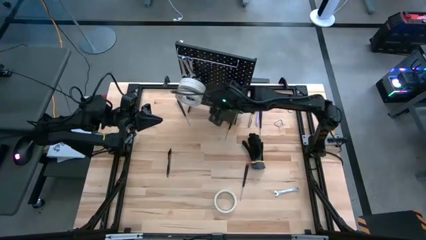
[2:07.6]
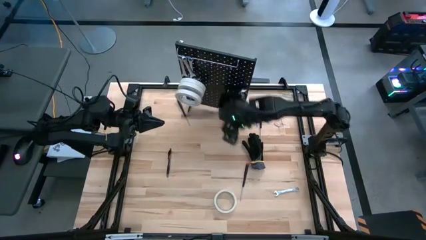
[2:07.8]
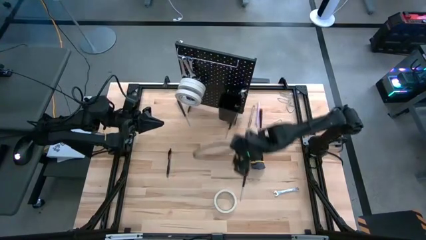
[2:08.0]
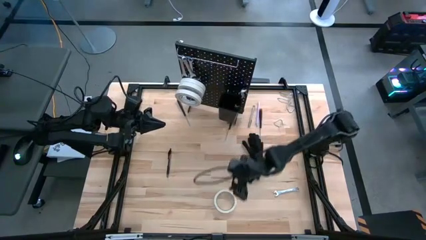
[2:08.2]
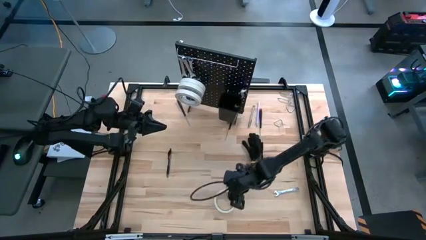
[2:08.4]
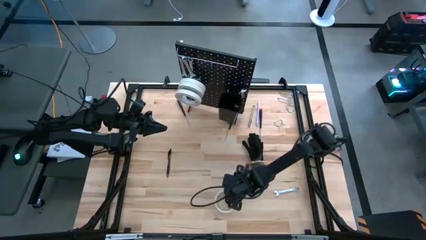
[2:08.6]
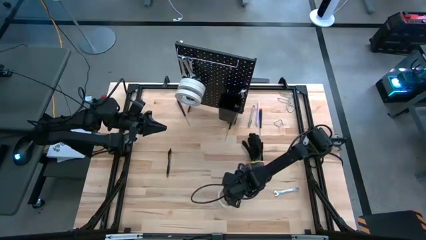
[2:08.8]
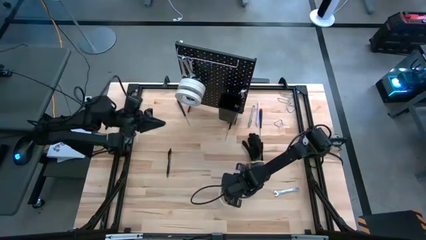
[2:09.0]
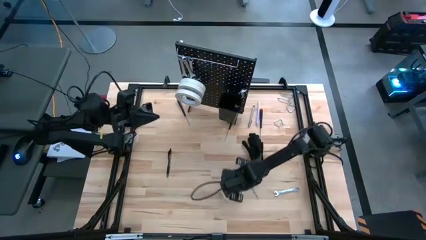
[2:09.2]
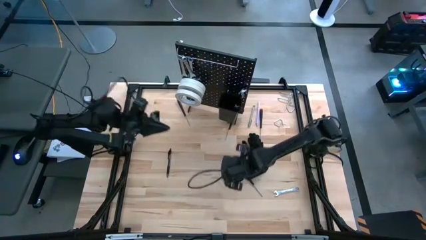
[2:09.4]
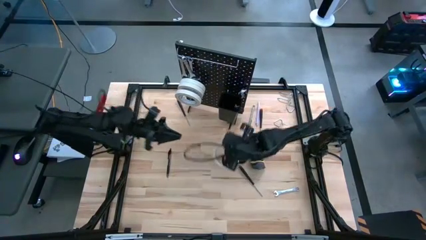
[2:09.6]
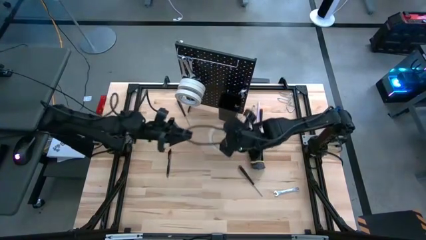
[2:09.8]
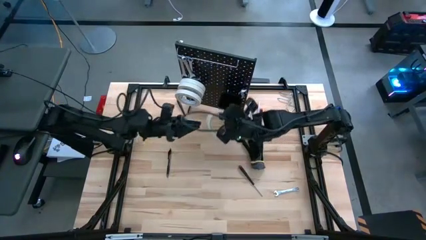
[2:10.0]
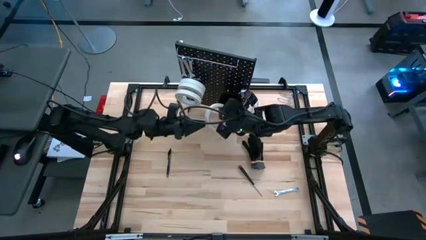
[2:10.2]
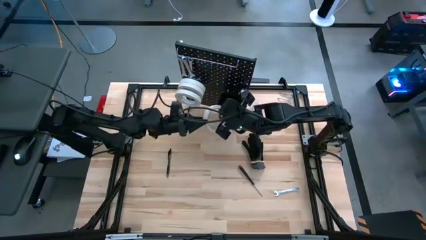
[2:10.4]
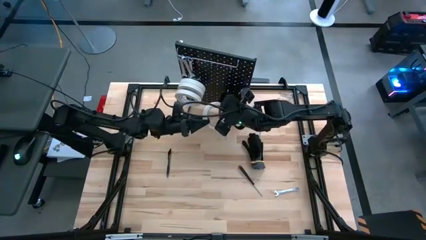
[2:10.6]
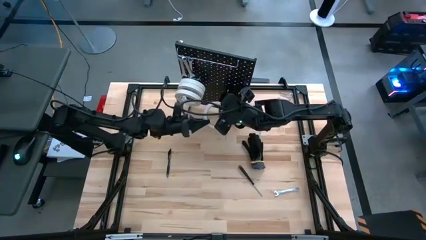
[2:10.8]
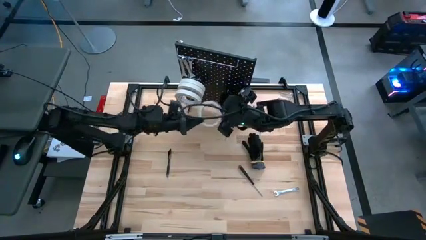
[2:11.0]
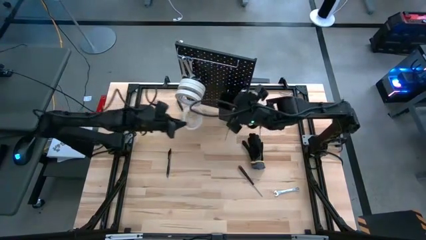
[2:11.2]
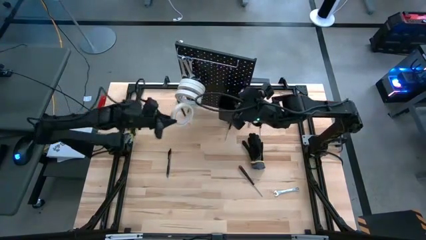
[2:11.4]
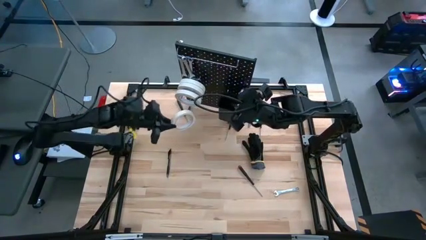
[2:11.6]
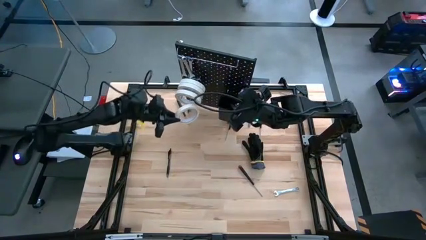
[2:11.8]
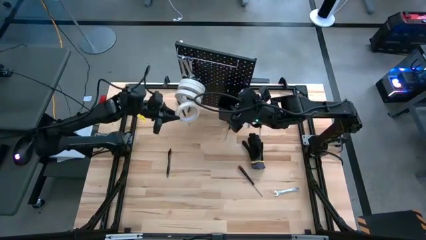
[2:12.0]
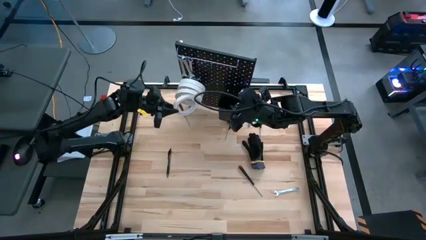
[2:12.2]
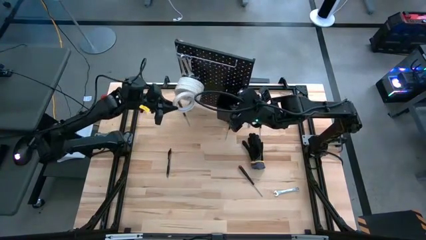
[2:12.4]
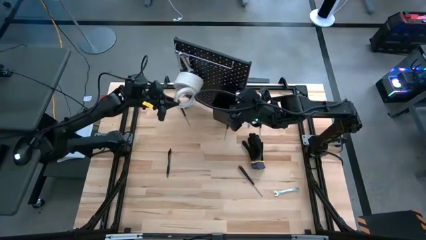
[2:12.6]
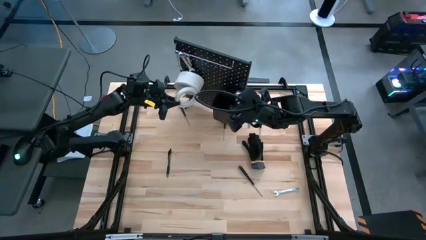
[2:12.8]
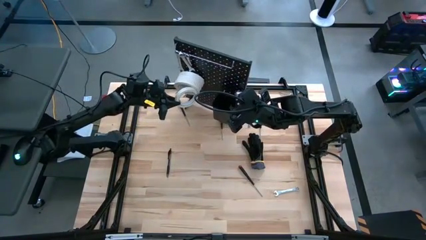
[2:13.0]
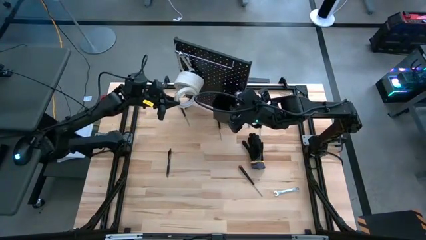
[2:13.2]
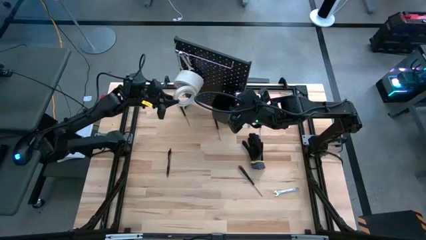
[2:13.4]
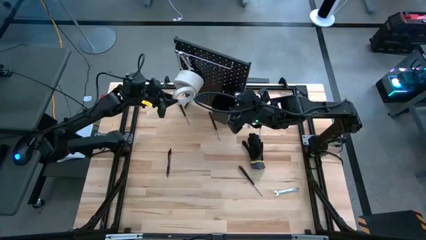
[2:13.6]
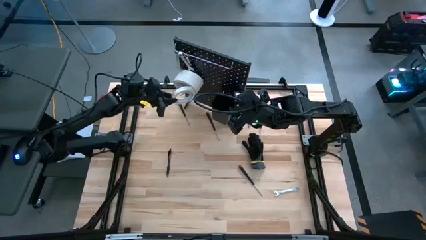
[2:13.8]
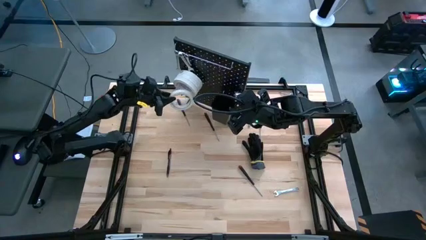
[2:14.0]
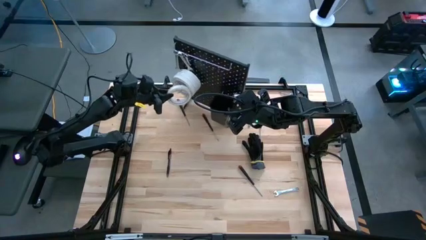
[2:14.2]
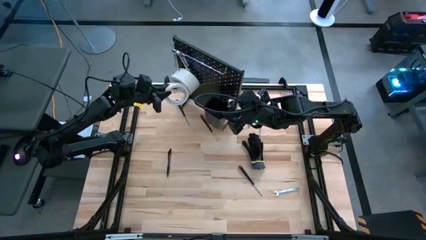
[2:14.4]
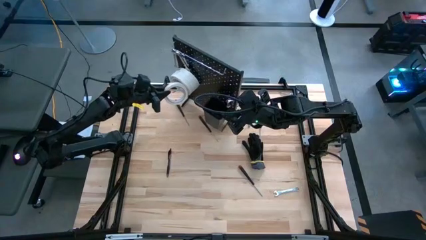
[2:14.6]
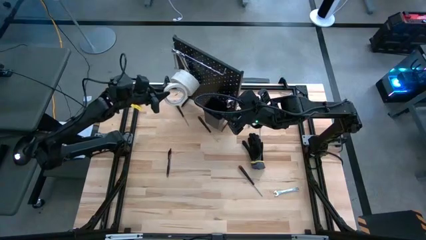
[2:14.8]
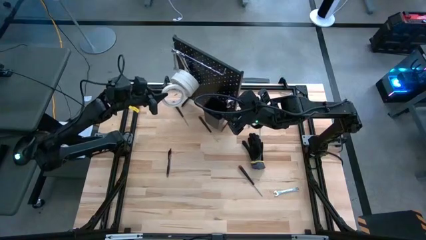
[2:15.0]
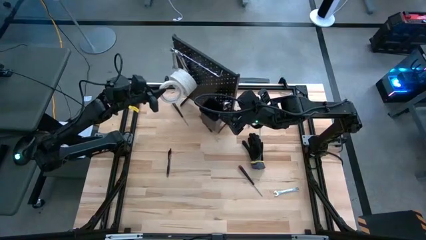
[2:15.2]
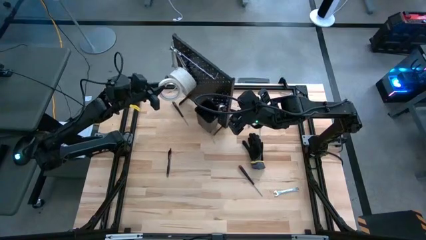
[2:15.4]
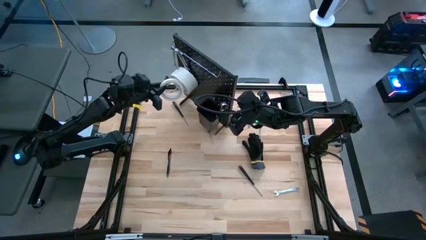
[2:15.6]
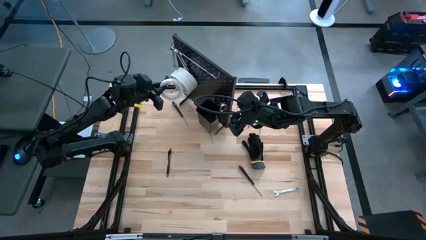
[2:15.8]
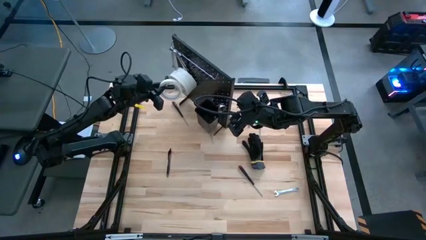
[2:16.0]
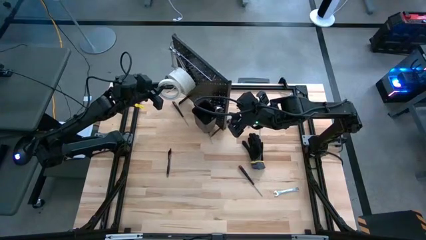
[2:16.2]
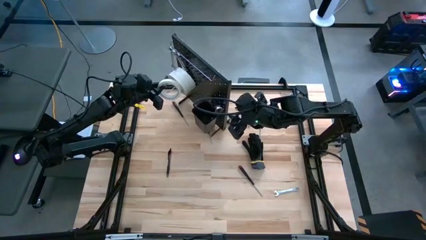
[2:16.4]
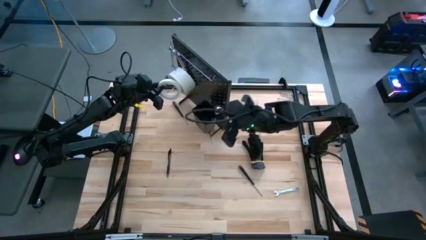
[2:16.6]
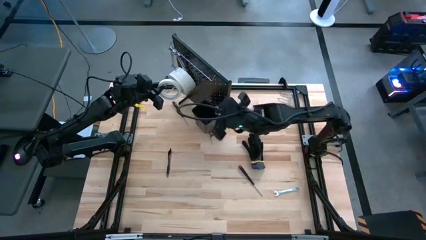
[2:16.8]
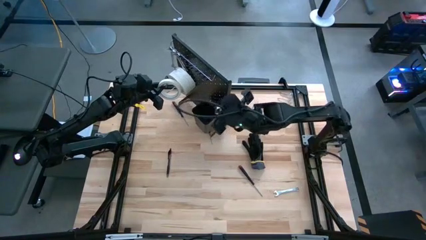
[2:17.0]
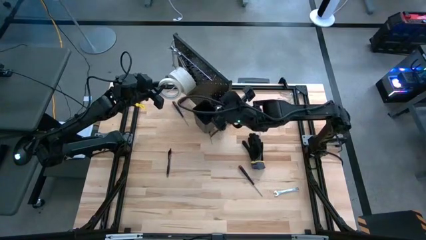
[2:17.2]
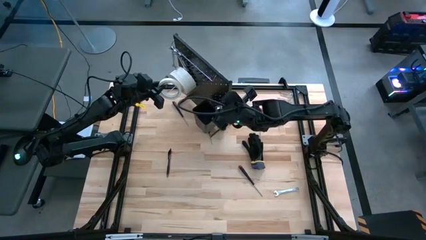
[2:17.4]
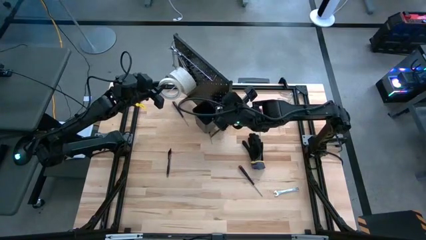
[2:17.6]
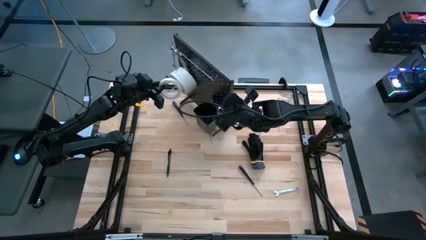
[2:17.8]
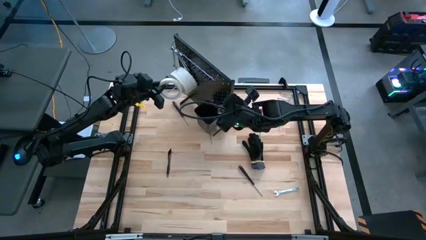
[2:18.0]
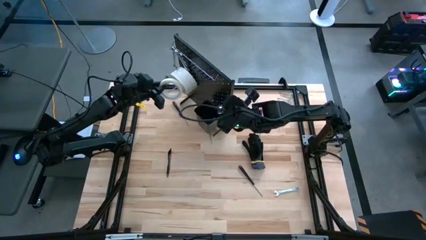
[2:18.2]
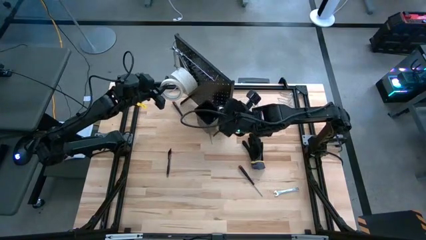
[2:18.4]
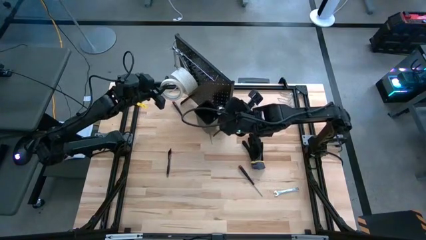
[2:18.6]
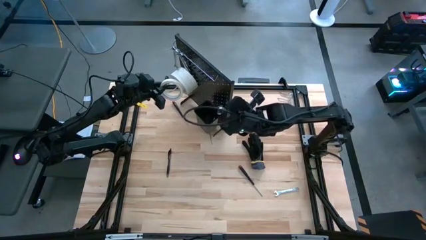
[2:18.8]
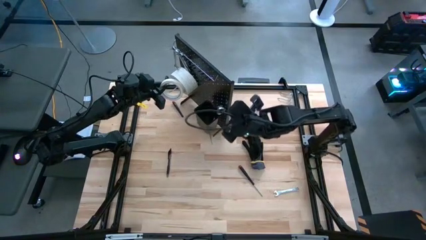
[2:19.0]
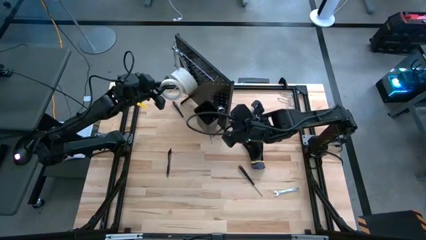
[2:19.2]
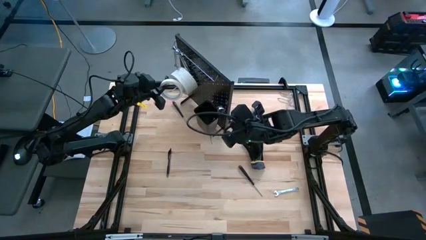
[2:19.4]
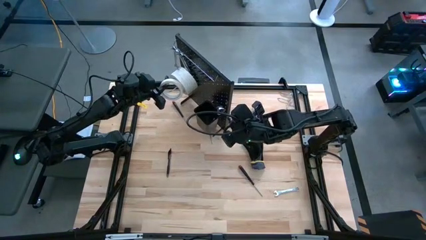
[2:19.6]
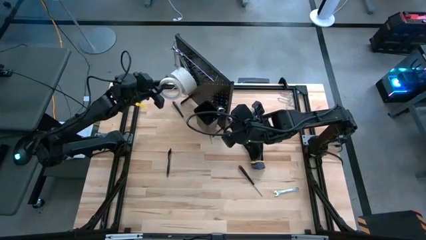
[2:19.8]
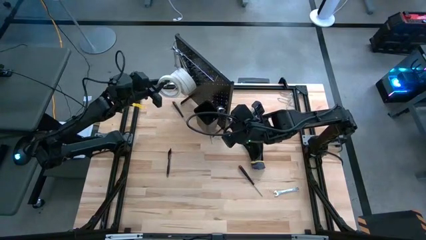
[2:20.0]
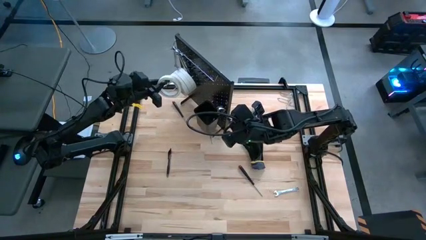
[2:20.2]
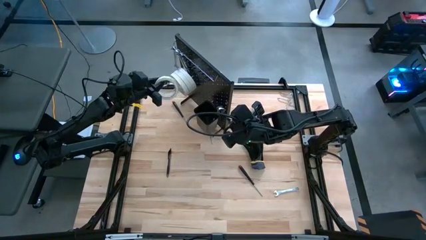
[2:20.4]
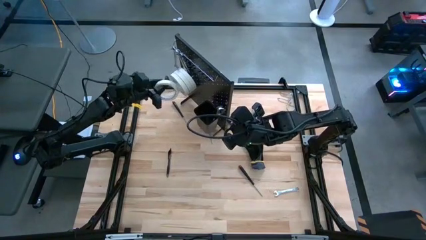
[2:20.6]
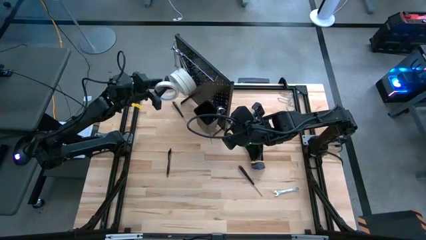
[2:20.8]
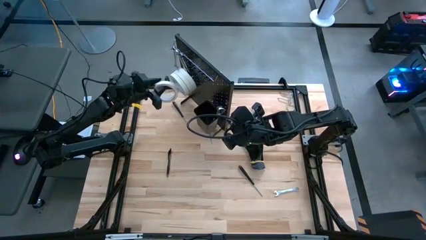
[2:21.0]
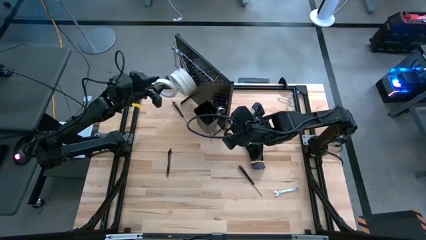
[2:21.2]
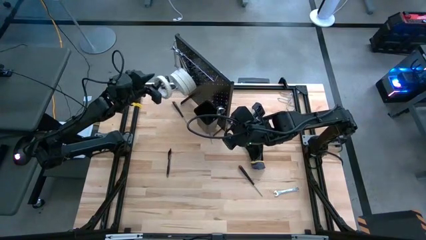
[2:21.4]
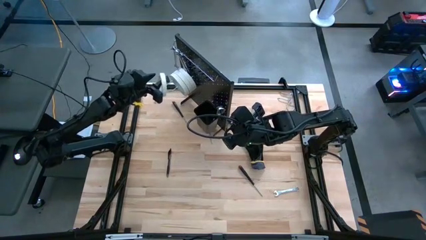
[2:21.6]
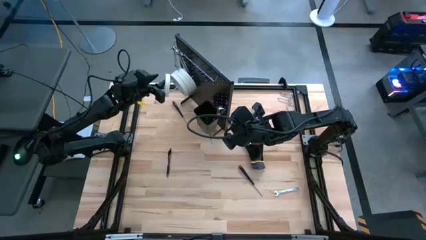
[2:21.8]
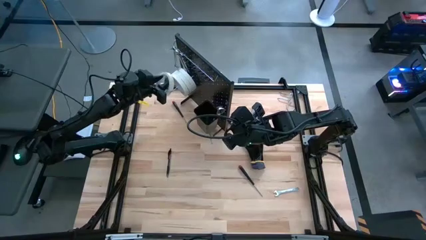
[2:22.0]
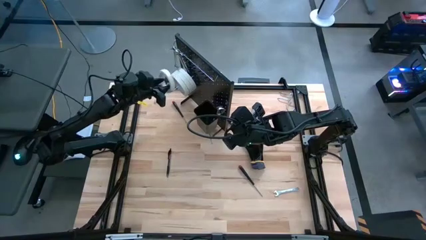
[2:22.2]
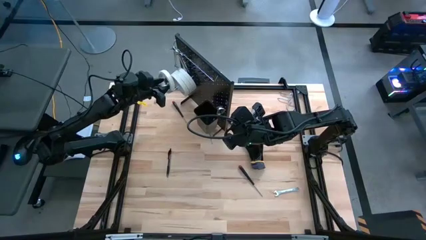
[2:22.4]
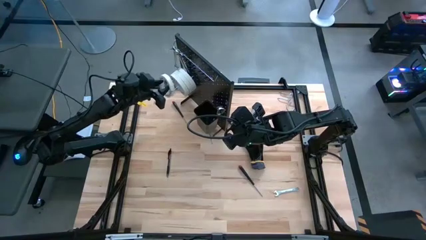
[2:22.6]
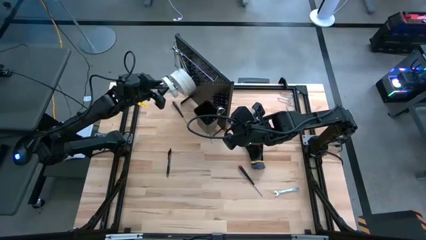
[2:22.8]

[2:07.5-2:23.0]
Task: Hang tools onto peg board
Hang the masking tape onto the pegboard
